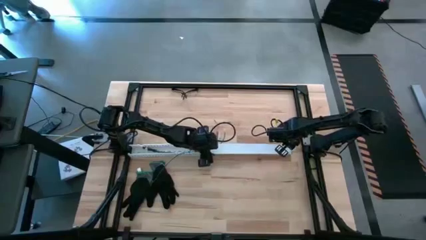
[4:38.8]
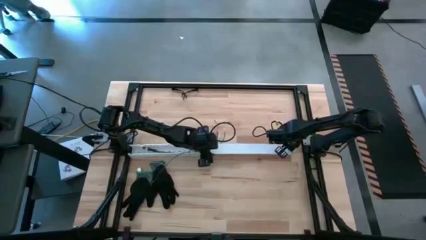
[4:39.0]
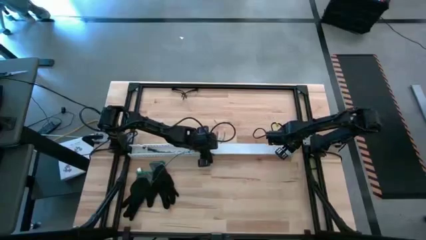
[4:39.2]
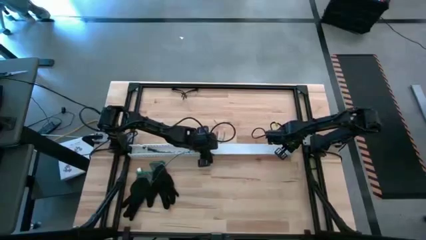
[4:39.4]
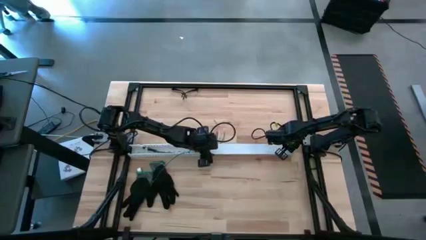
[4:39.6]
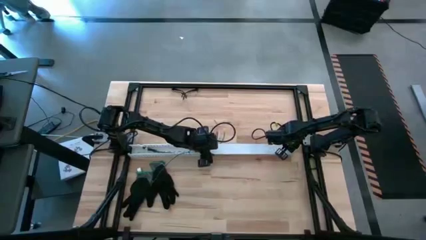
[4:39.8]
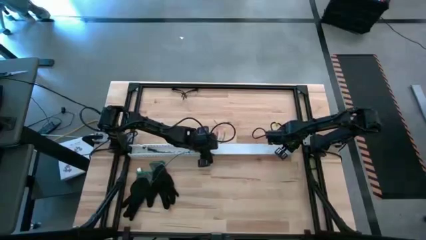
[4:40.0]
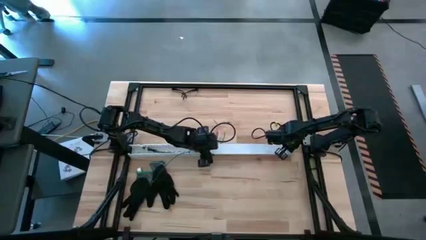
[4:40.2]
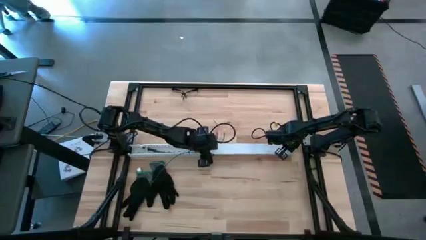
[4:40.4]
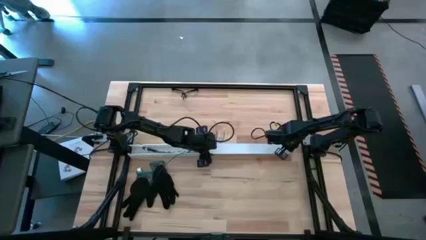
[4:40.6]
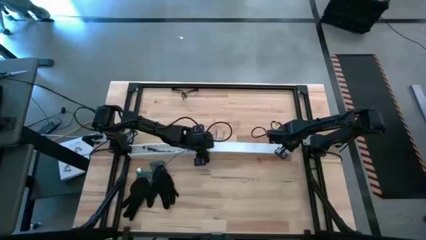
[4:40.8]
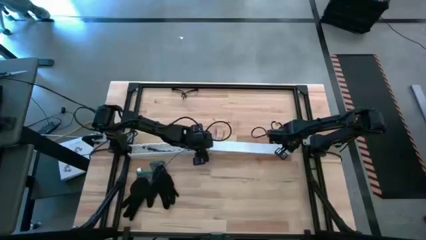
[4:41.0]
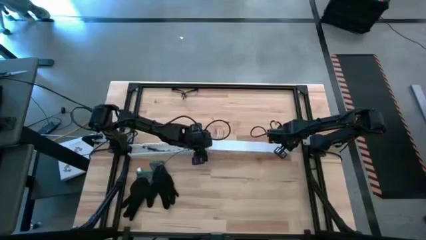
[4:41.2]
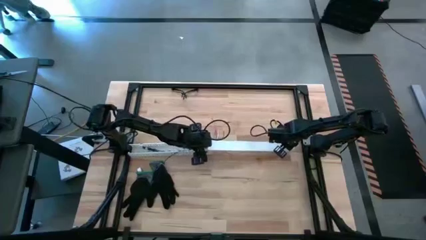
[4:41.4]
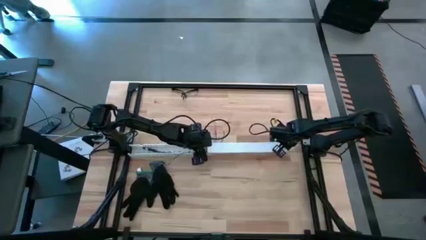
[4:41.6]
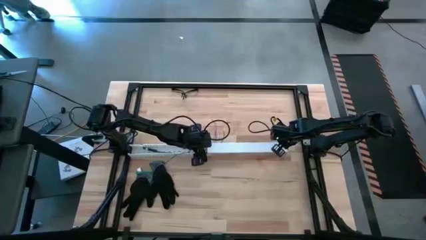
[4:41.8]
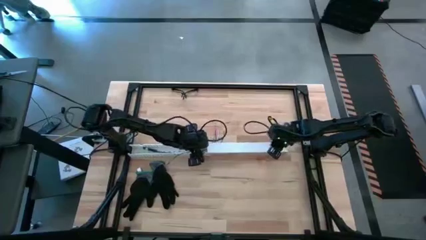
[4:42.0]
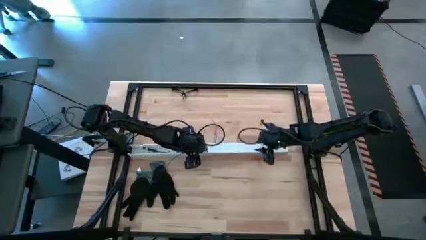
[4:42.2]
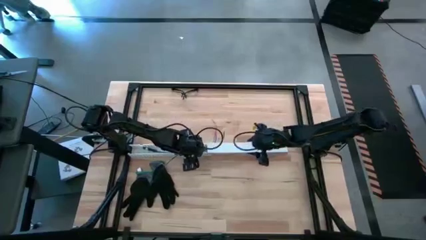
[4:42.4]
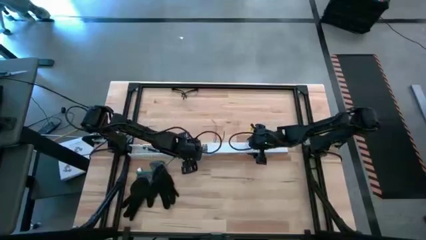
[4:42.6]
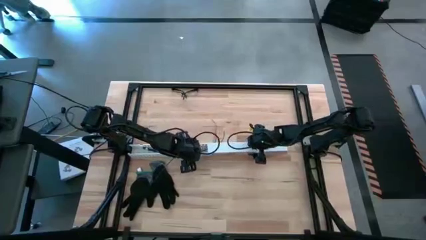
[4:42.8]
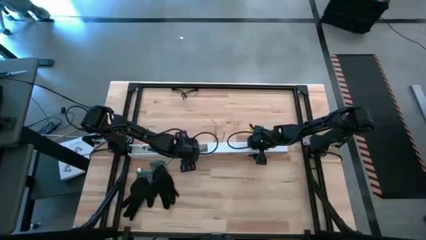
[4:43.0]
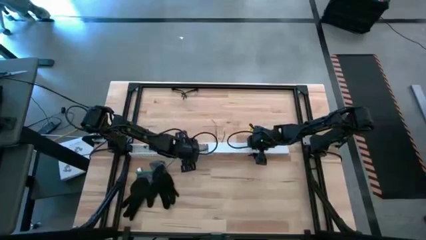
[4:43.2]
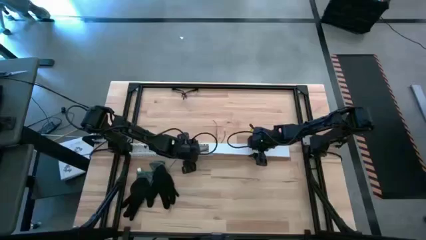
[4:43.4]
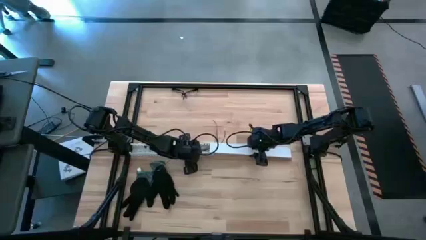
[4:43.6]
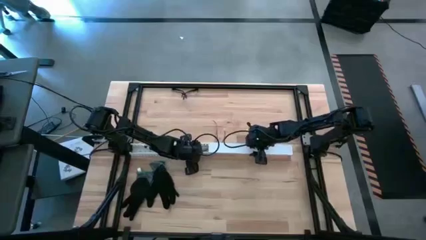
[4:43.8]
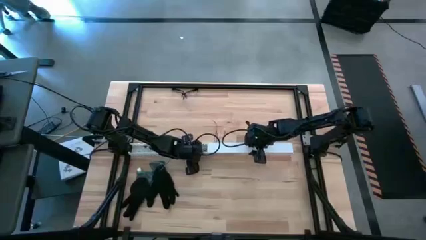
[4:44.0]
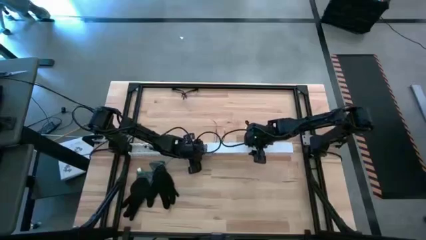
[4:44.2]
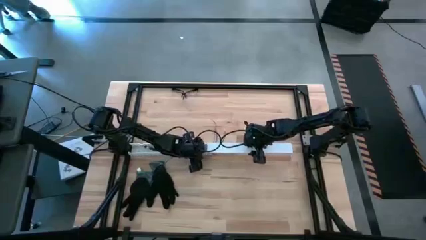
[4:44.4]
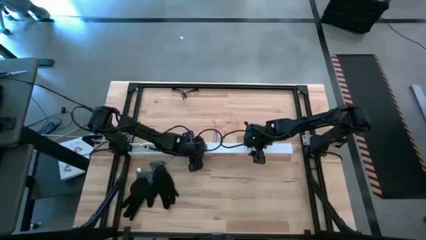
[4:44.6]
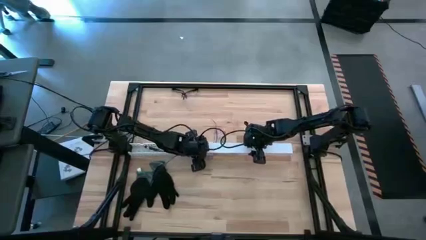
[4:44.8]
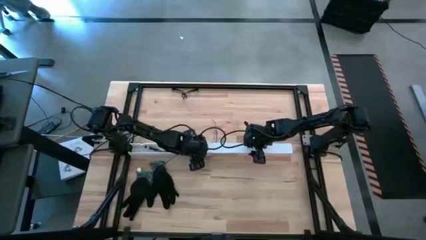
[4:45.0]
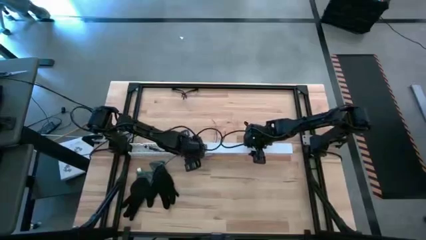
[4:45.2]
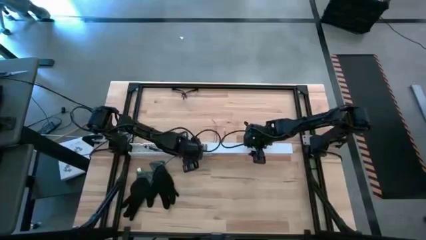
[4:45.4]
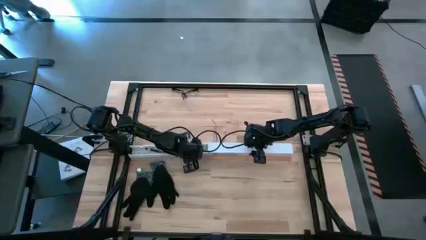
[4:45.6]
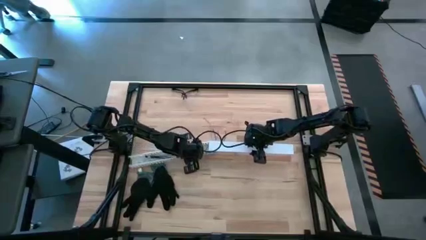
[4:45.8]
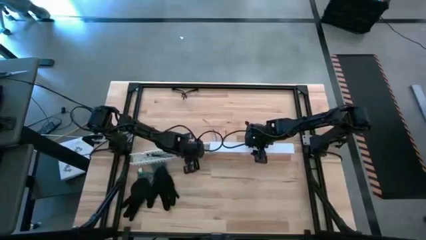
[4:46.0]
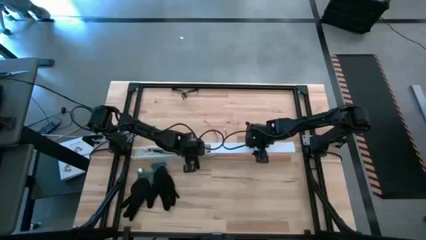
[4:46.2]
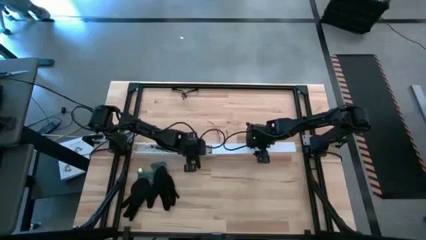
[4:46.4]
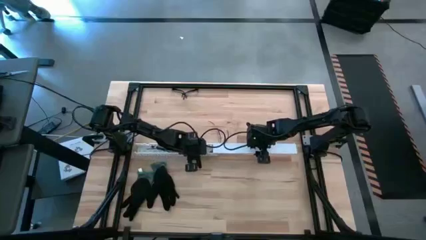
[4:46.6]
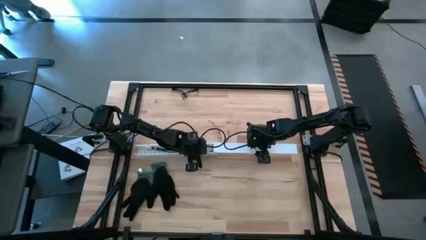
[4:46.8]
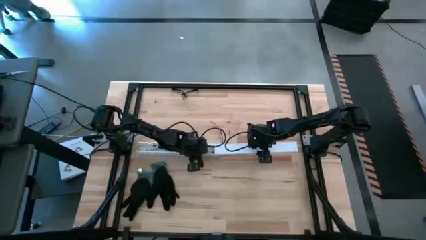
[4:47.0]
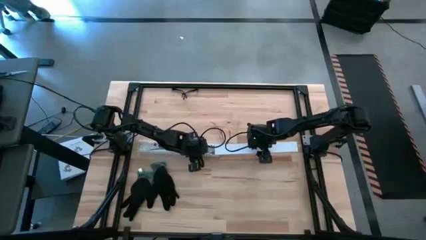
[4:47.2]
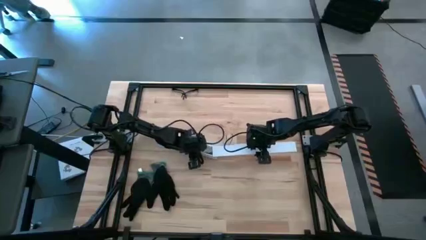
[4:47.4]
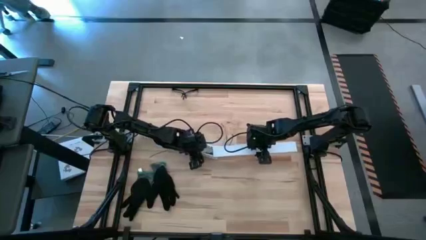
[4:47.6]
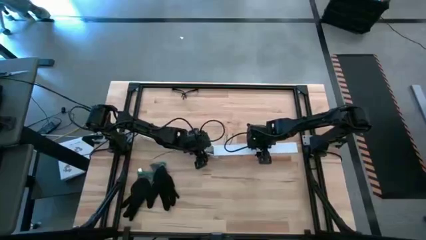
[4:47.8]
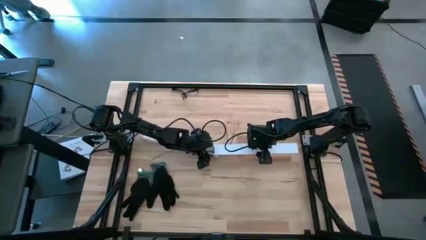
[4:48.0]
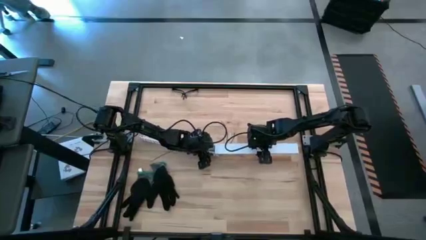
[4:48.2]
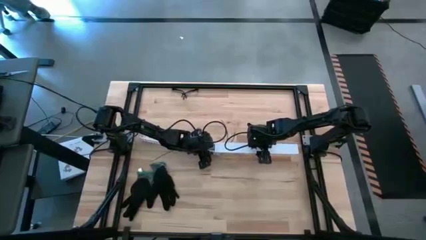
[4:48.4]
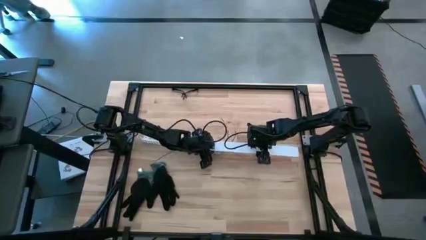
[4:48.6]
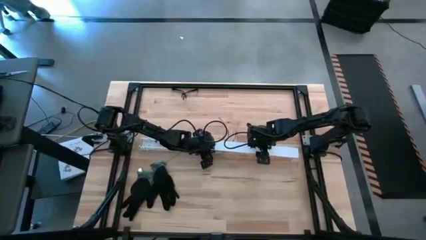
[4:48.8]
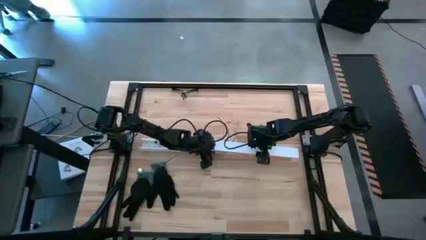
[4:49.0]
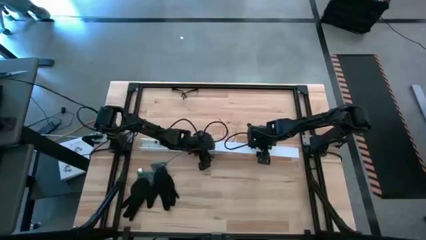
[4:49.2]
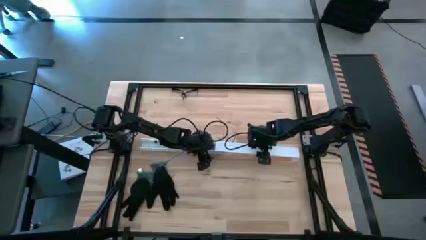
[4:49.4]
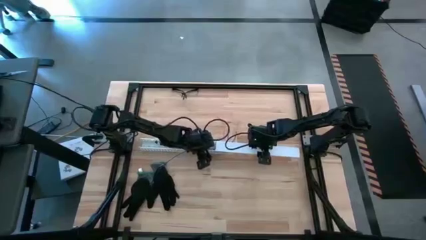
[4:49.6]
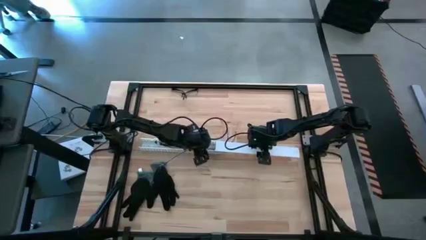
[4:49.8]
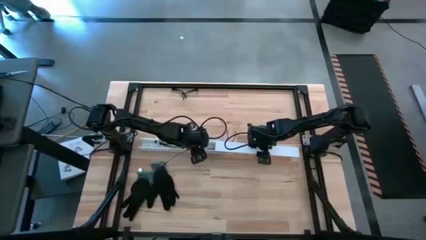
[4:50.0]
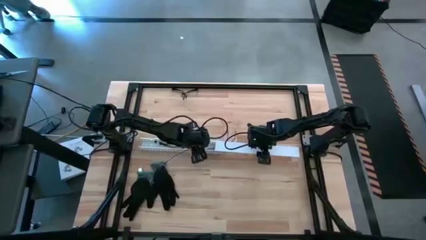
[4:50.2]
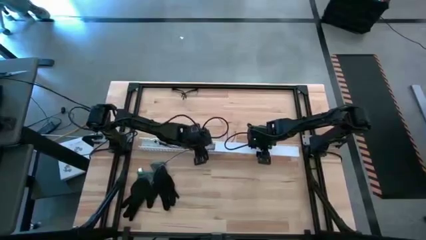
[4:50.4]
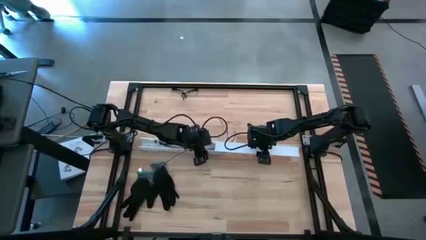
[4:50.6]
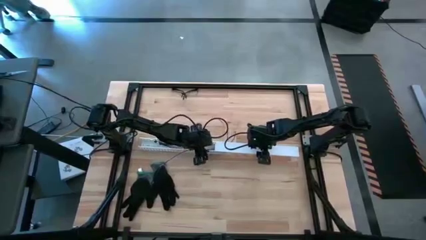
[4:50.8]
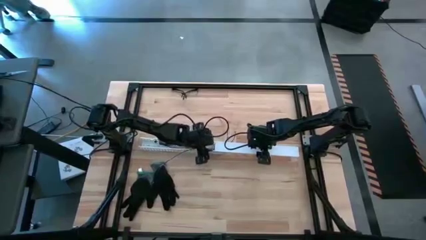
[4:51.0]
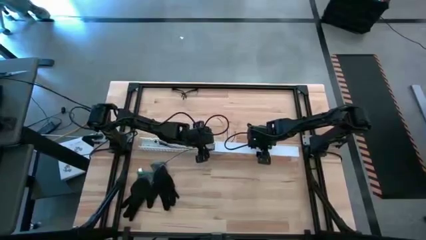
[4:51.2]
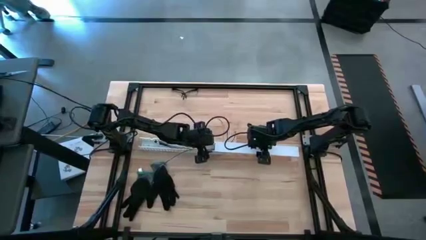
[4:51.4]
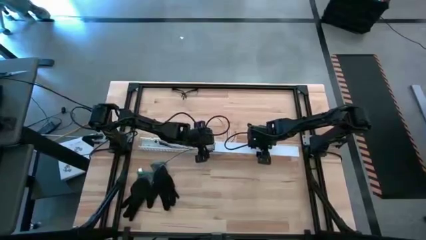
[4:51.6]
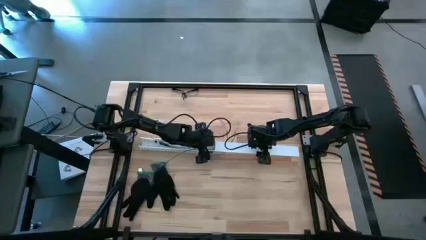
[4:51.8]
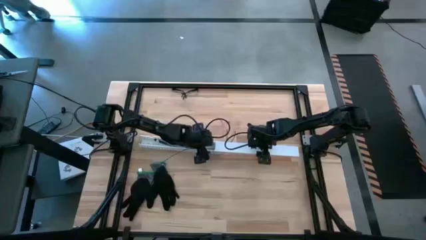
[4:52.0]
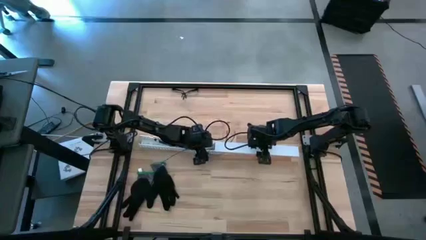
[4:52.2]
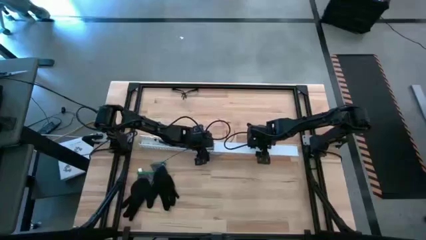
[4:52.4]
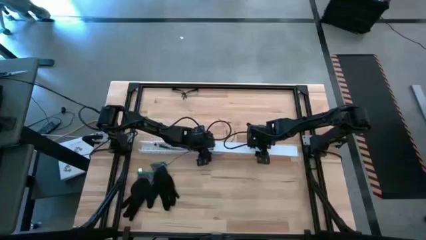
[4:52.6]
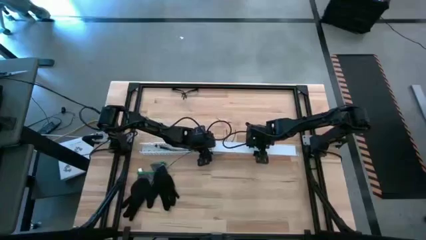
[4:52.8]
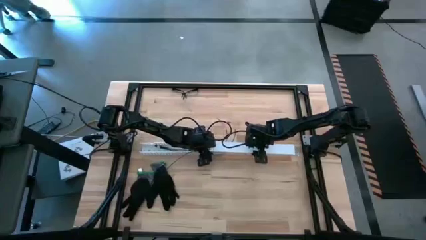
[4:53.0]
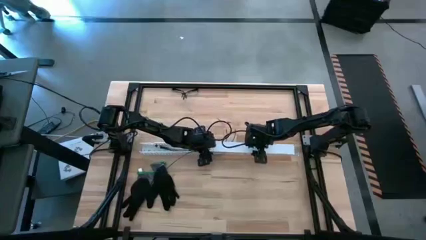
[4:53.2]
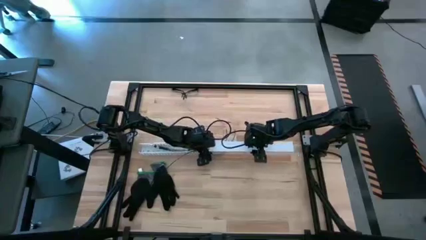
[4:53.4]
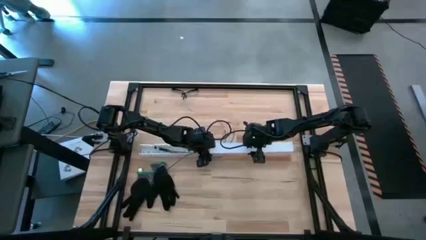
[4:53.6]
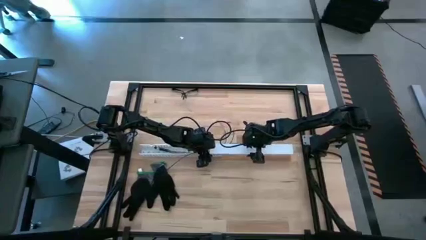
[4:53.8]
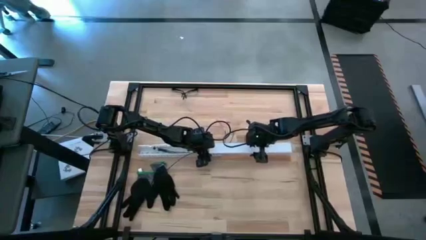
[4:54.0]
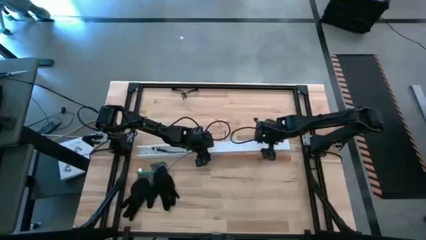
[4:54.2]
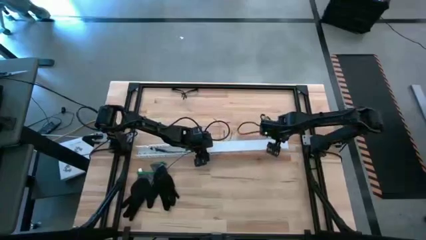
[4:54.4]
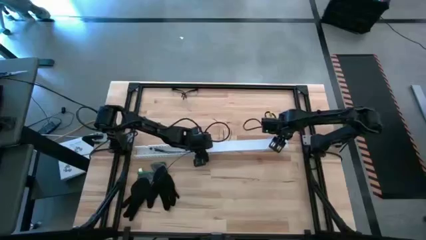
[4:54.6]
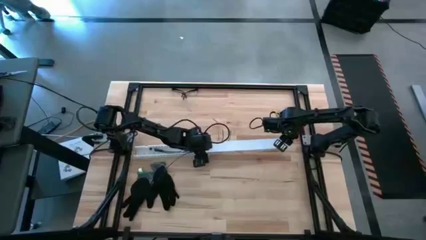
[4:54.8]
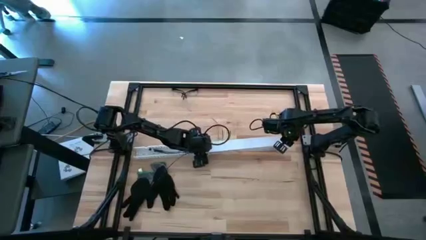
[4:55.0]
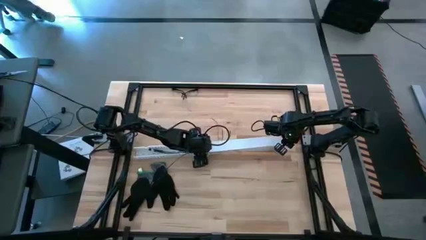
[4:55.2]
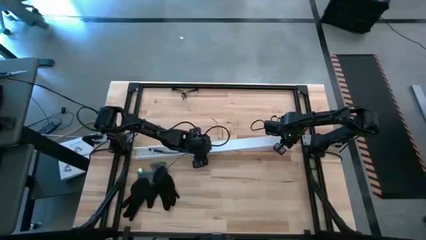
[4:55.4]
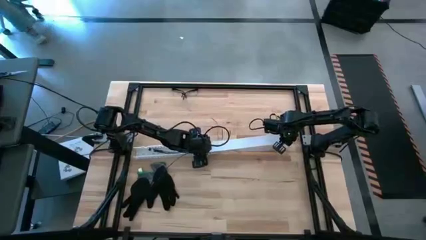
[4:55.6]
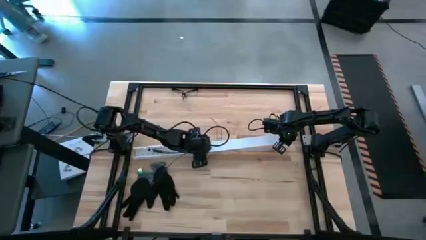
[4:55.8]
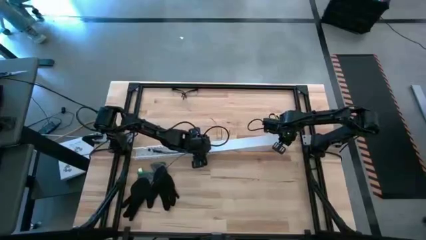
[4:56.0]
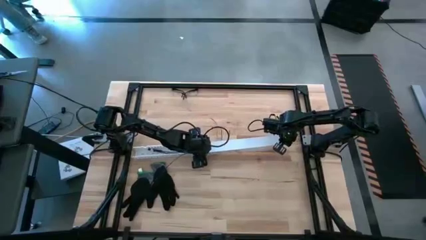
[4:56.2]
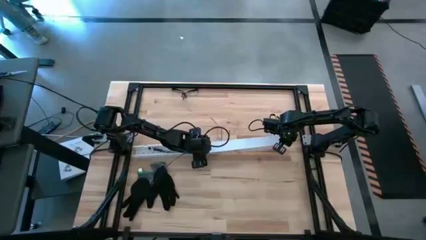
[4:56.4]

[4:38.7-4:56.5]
Task: Ziptie cables
Close the white cable duct
